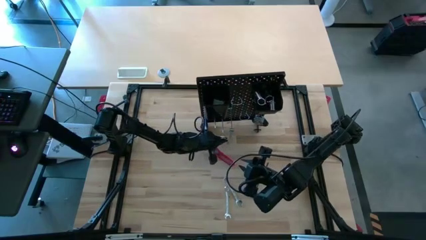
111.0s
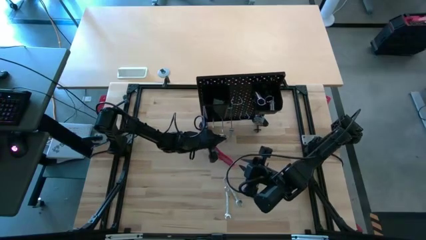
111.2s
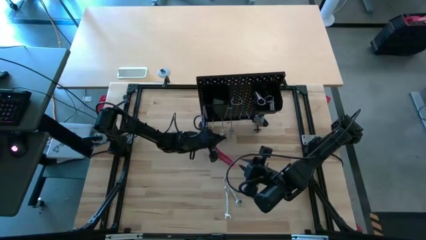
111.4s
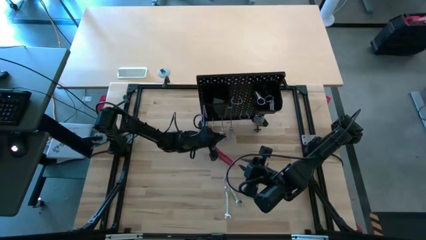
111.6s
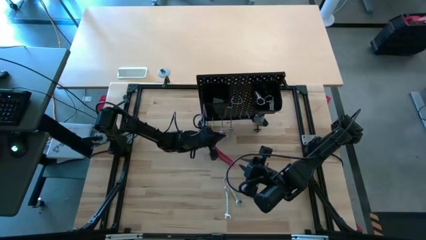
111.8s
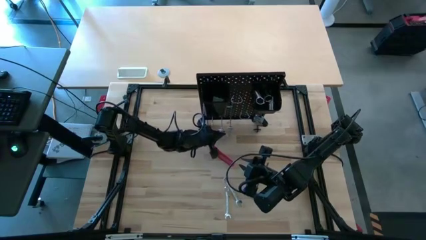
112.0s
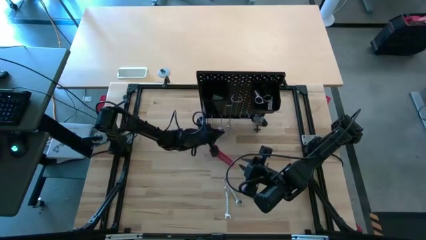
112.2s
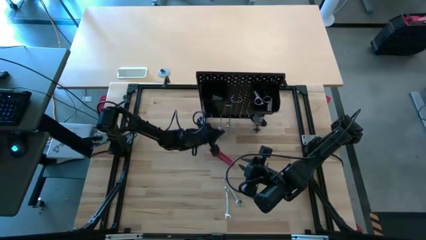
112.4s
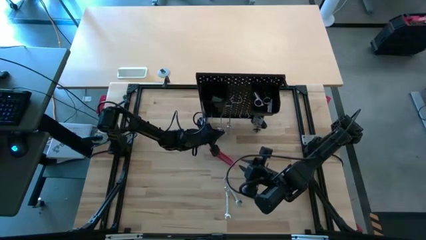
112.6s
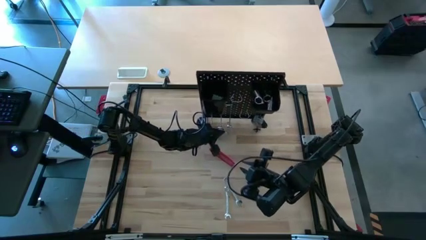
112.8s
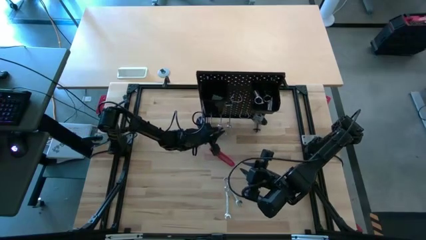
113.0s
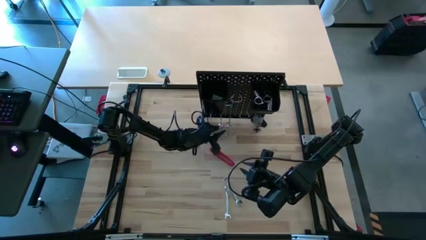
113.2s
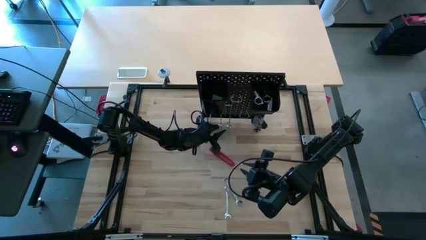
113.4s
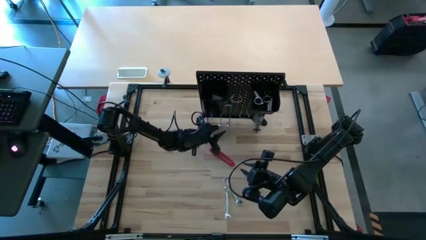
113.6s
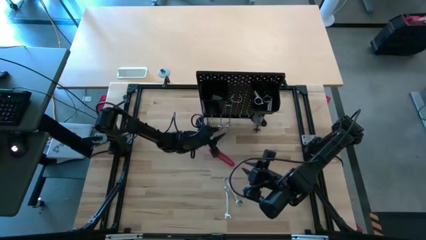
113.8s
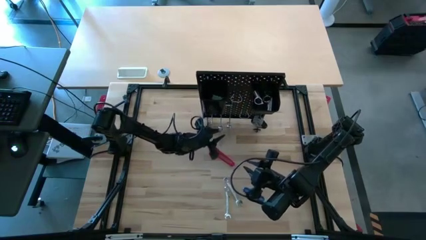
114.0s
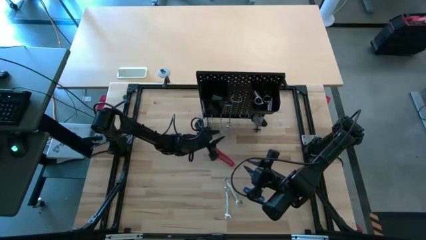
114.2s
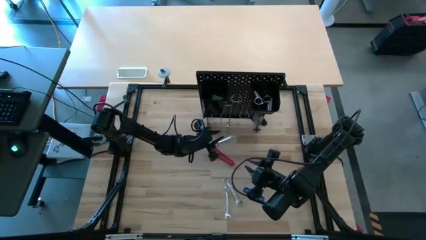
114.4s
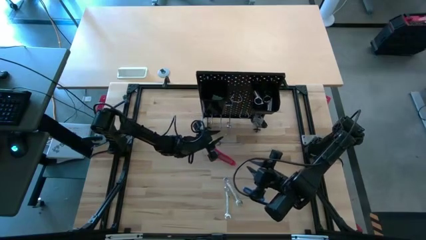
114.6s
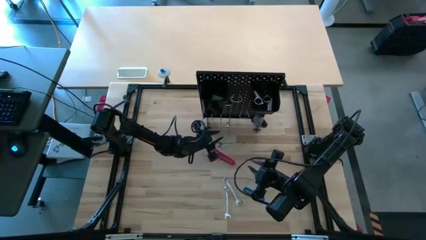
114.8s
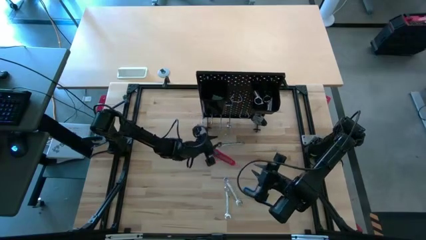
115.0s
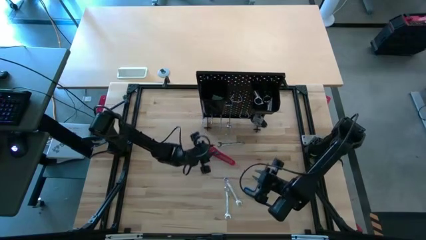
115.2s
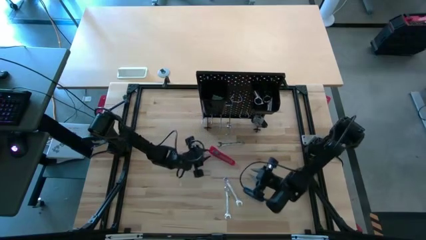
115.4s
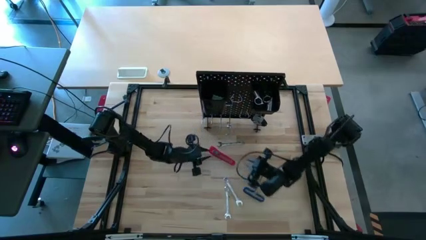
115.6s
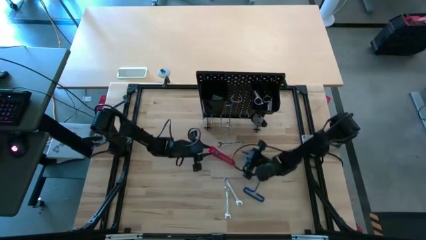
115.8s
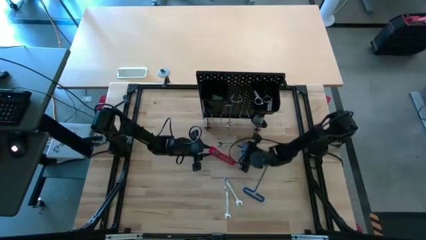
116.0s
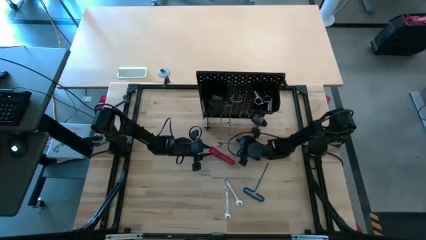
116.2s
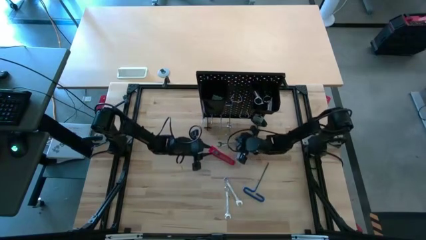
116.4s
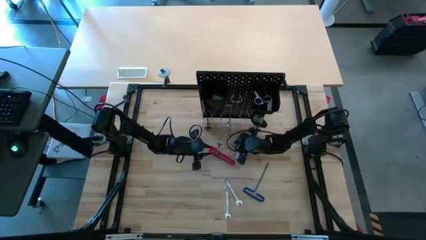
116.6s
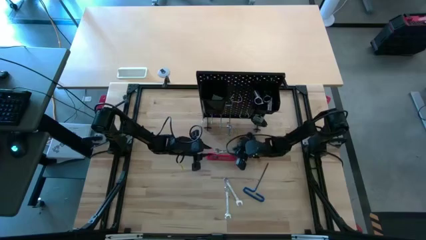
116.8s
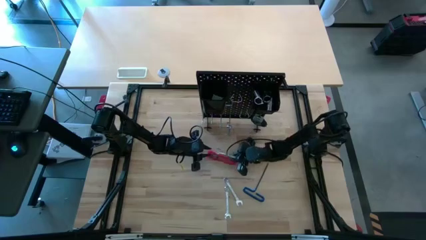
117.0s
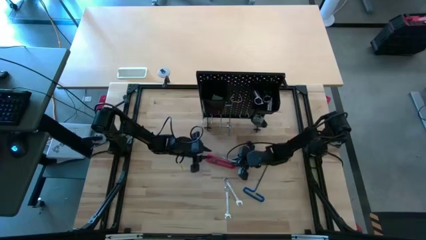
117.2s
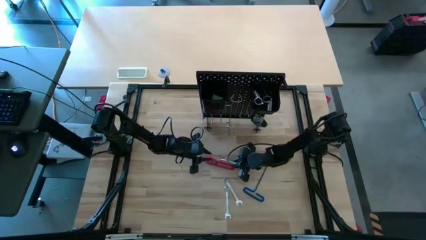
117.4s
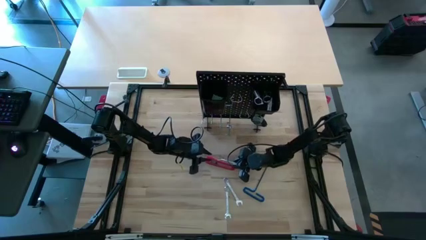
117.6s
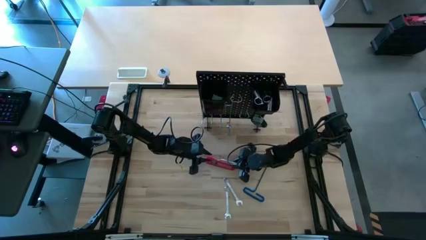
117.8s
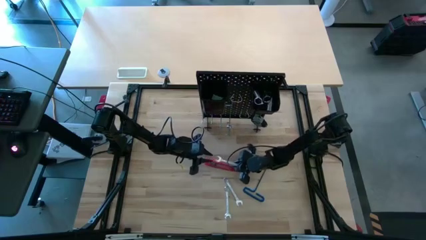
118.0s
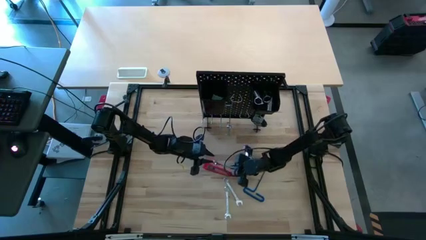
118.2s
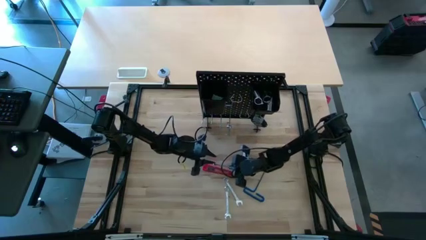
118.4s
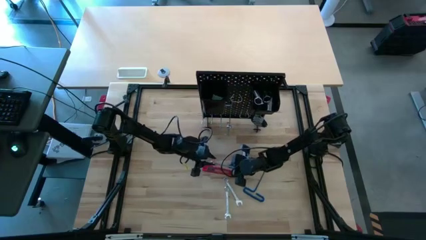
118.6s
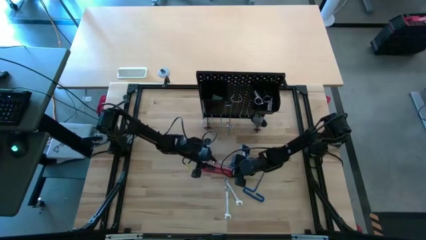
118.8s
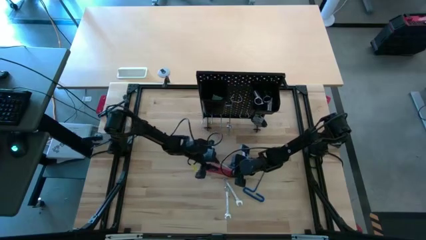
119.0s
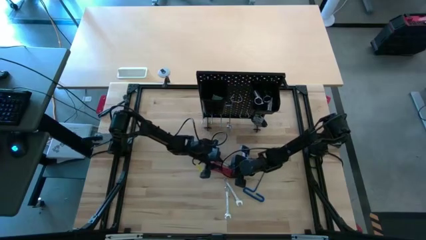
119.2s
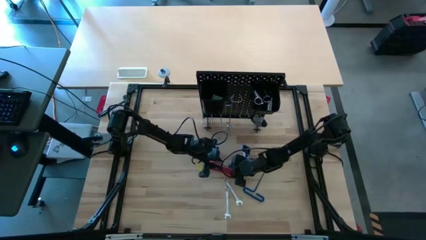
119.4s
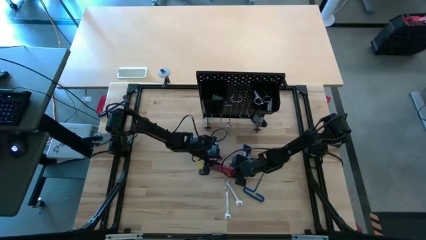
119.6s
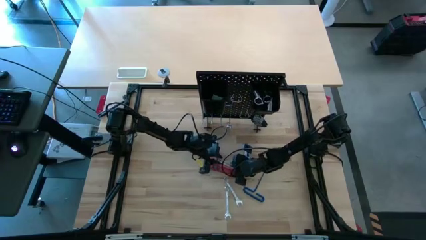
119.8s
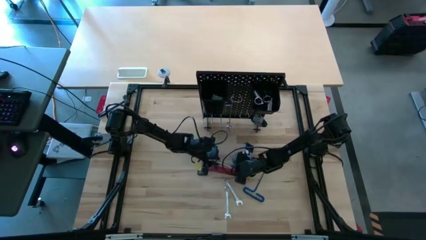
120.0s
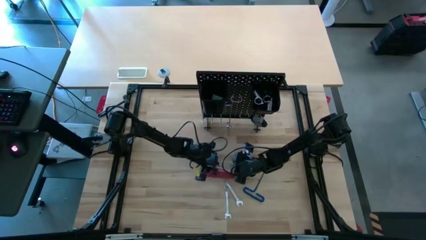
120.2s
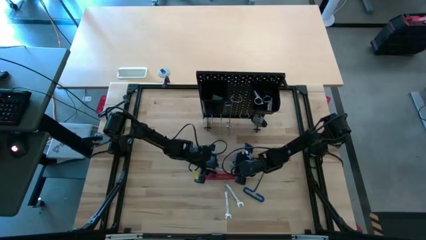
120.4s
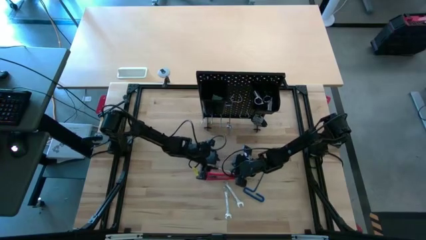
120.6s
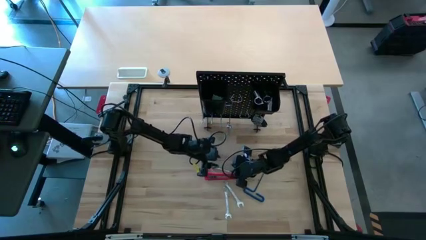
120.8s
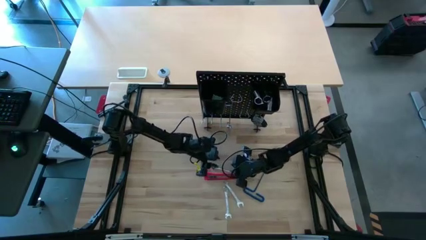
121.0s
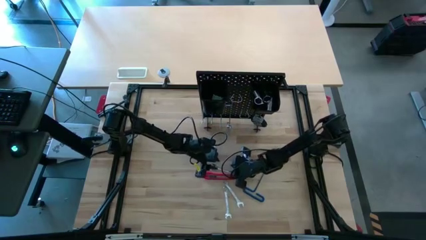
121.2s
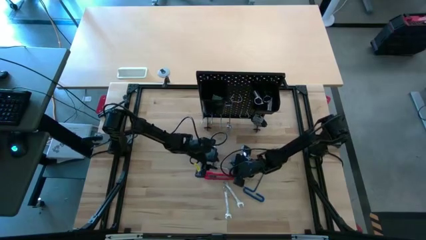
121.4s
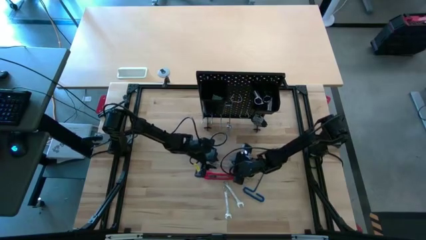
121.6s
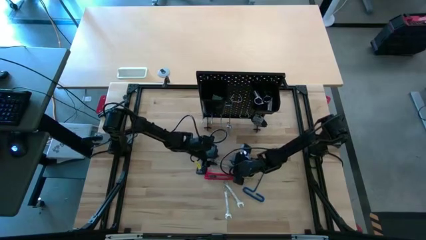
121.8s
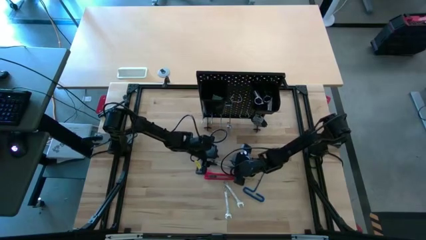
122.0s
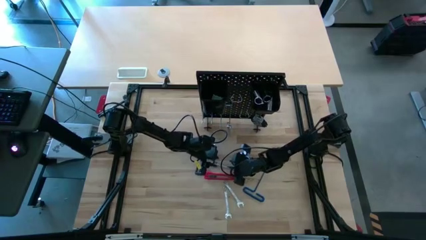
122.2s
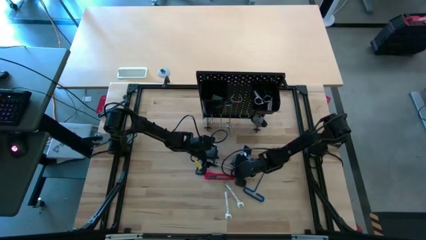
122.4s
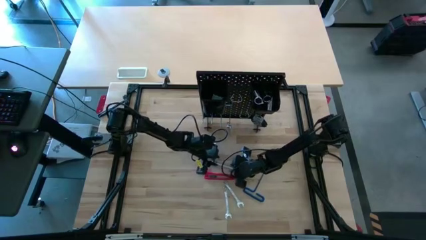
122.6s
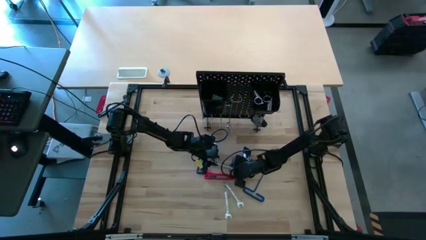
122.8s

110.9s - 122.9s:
Task: Hang tools onto peg board
Hang the wrench on the peg board

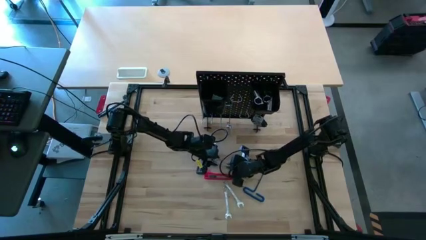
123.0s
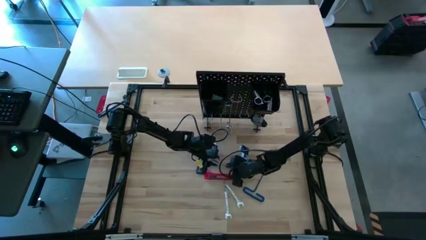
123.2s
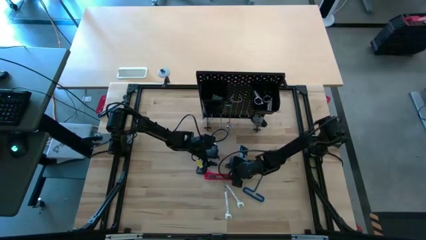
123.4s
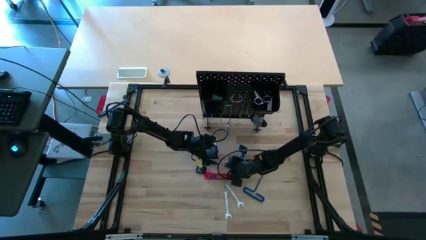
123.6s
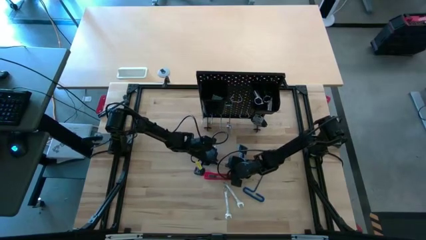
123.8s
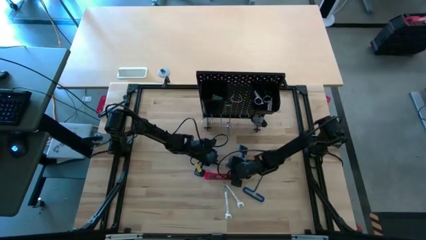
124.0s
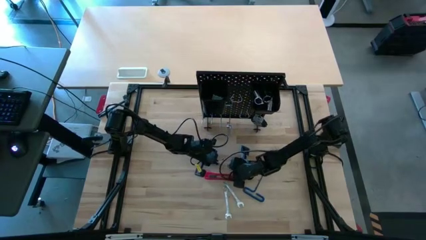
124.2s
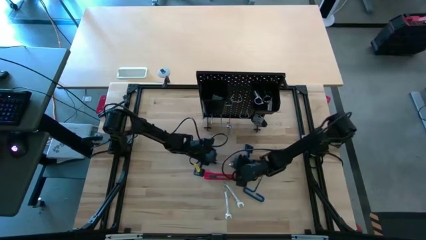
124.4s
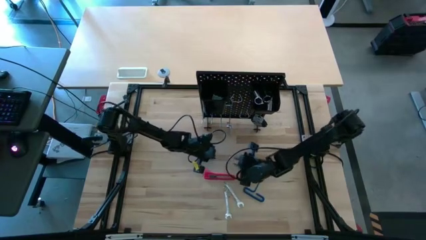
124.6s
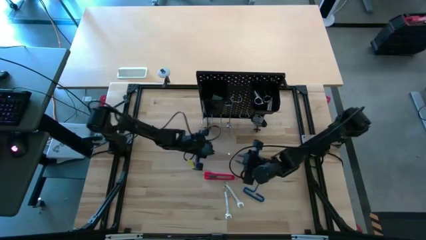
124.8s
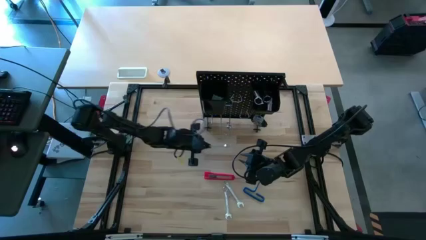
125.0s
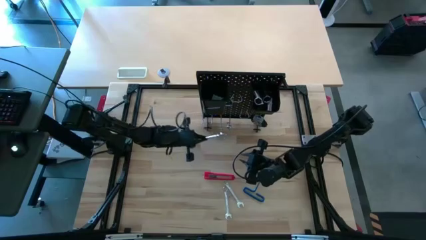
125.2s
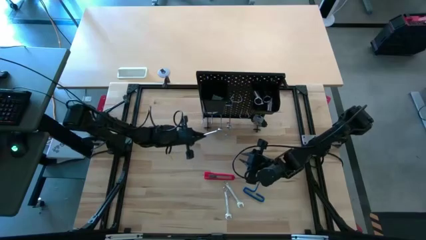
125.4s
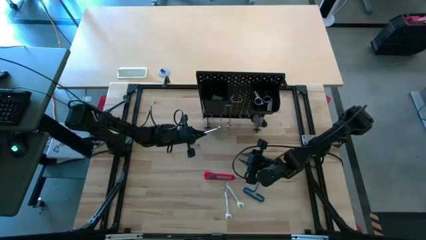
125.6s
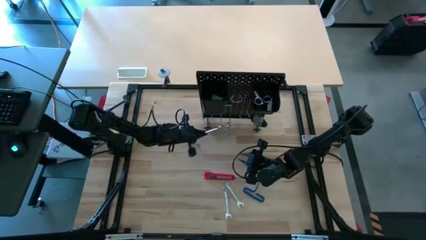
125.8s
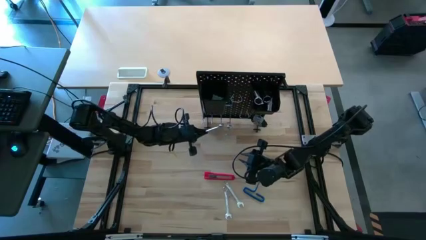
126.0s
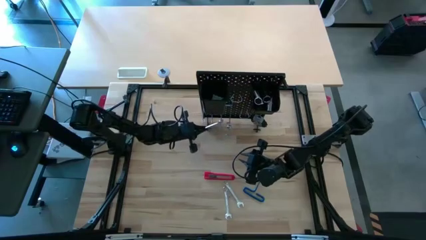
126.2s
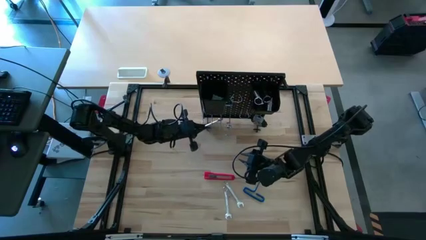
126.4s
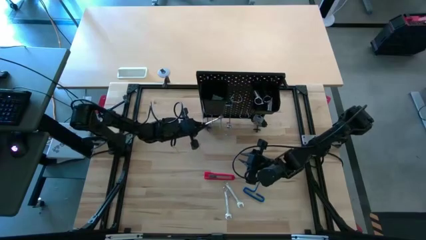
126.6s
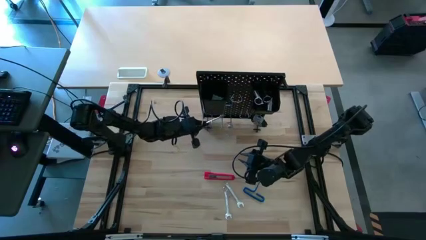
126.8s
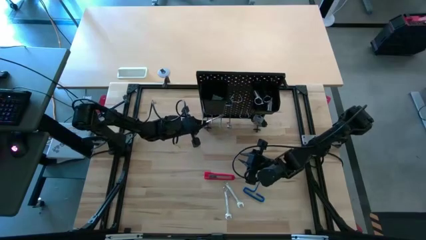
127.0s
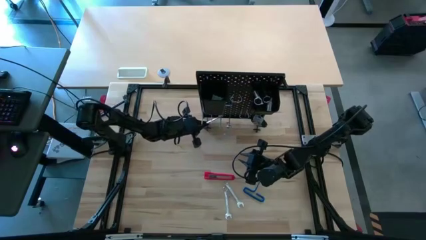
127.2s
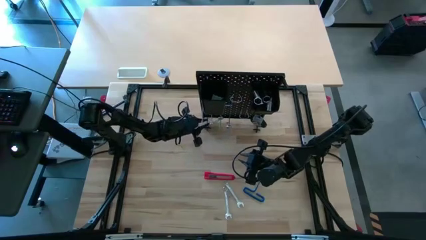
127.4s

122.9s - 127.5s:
Hang the wrench on the peg board

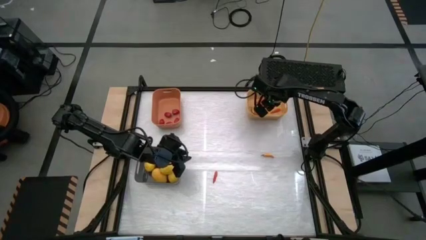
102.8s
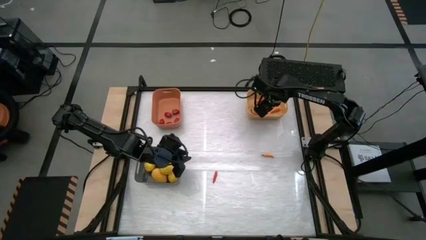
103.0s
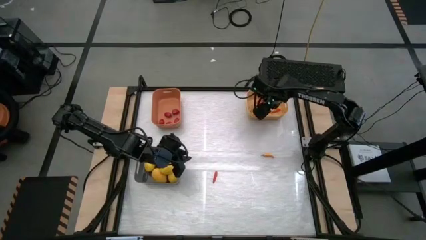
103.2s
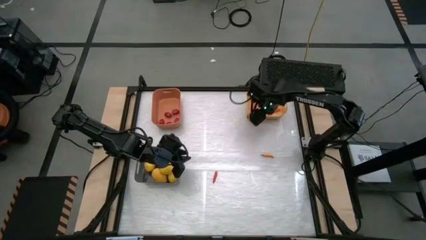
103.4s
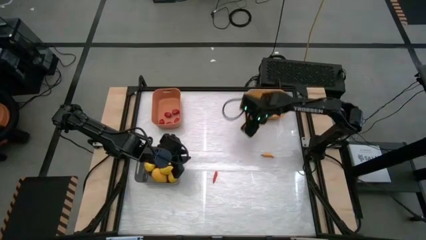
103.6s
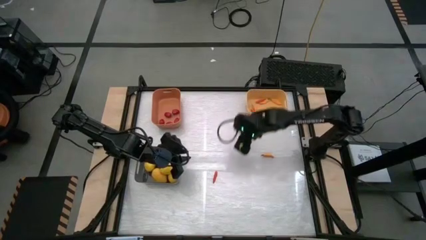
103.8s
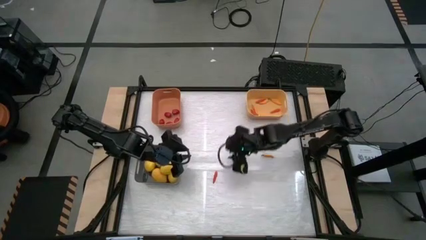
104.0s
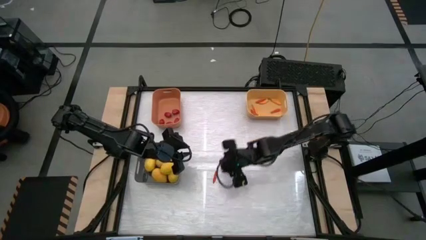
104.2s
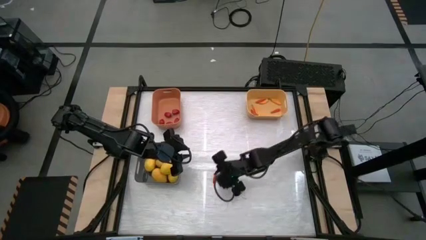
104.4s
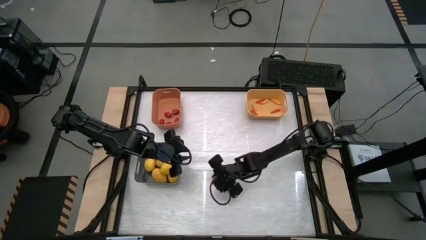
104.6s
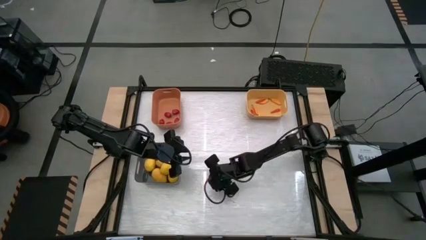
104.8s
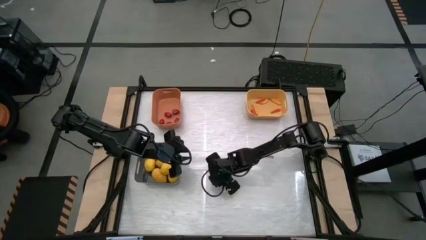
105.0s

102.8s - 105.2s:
Task: Sort produce into baskets
Put the orange chili pepper into the yellow bin
